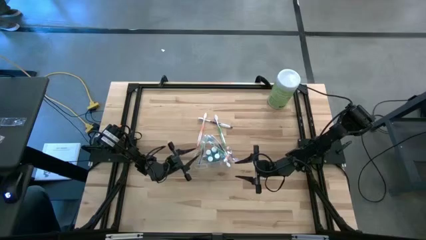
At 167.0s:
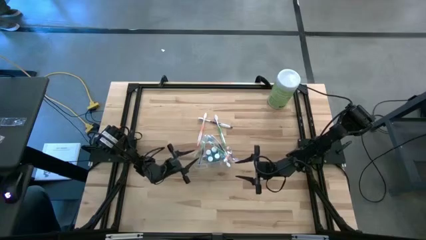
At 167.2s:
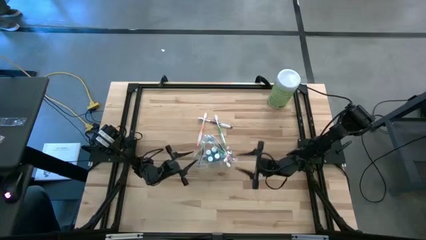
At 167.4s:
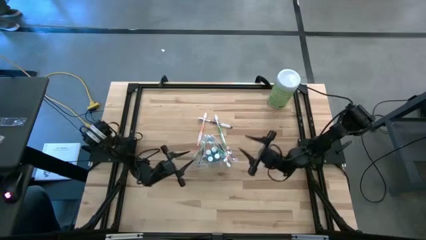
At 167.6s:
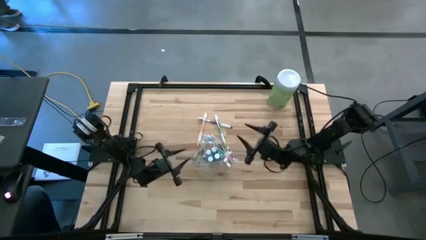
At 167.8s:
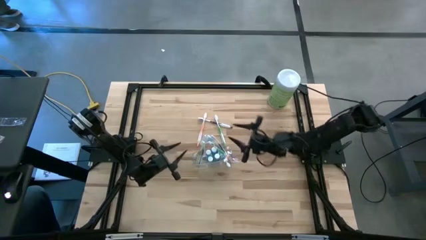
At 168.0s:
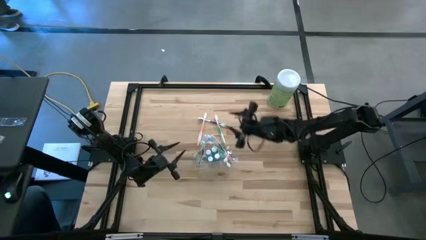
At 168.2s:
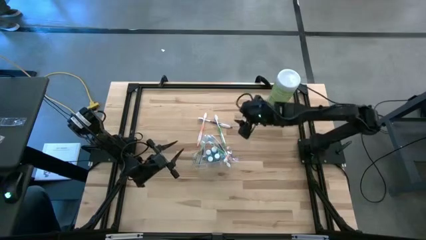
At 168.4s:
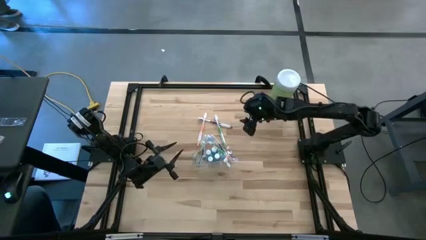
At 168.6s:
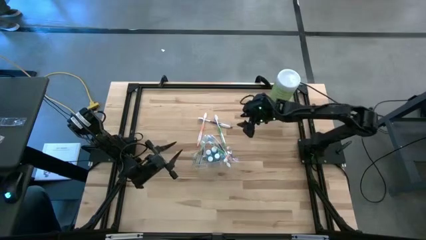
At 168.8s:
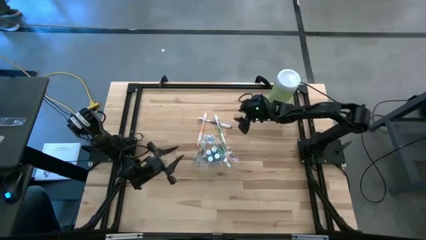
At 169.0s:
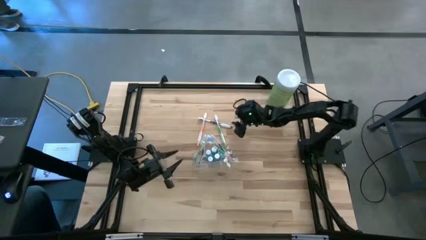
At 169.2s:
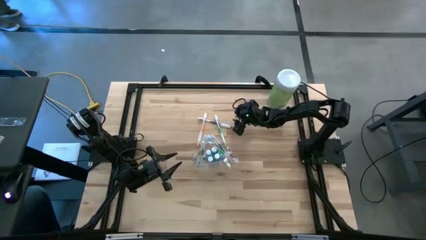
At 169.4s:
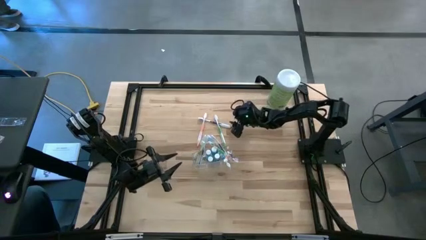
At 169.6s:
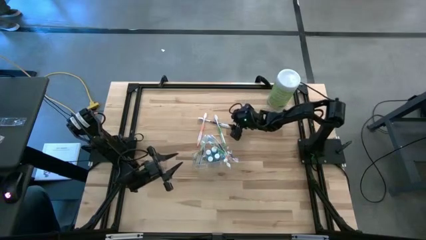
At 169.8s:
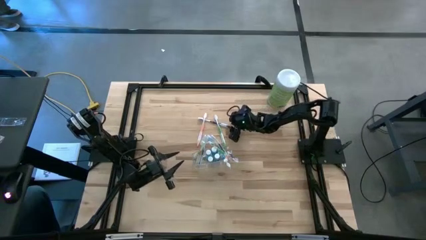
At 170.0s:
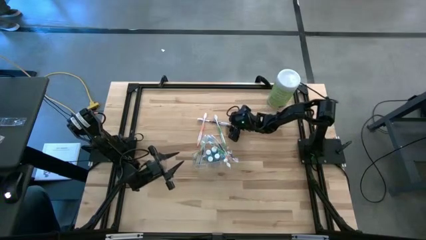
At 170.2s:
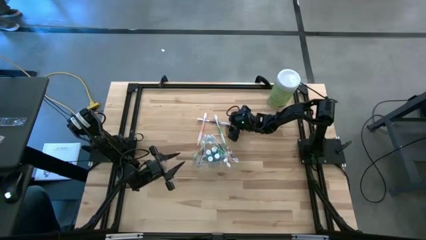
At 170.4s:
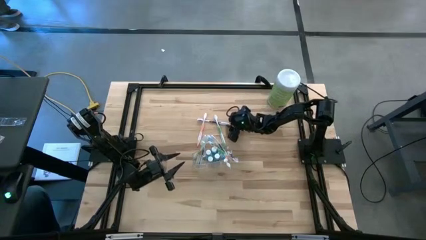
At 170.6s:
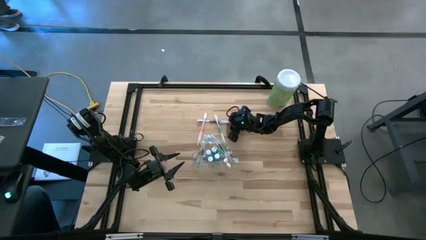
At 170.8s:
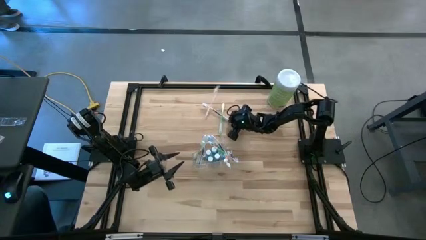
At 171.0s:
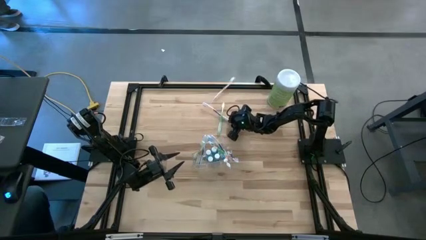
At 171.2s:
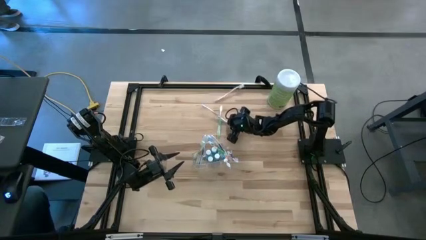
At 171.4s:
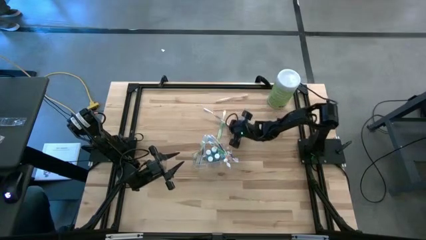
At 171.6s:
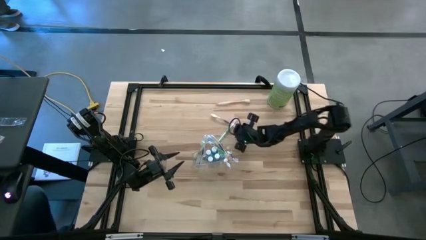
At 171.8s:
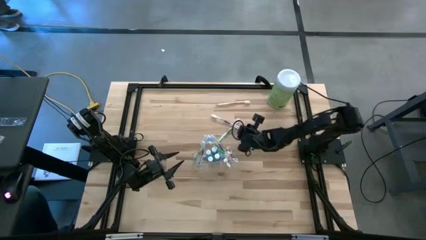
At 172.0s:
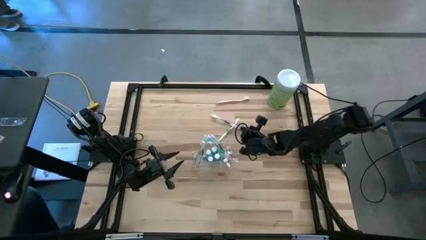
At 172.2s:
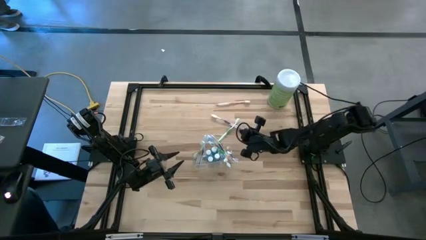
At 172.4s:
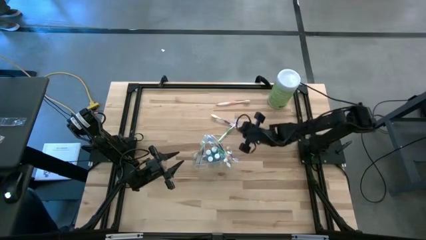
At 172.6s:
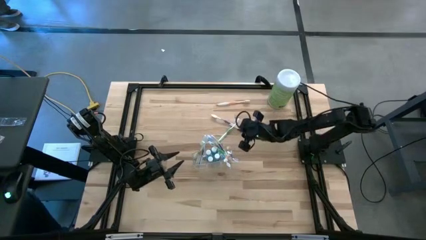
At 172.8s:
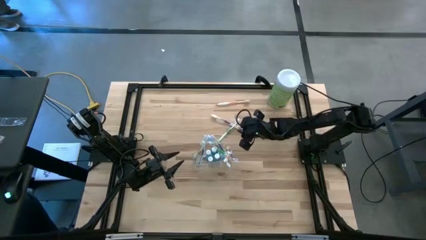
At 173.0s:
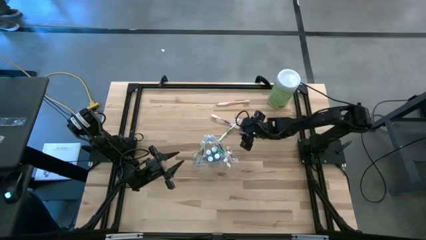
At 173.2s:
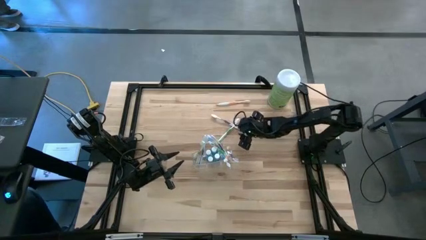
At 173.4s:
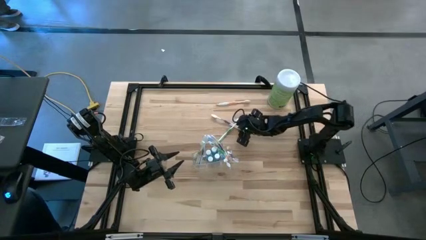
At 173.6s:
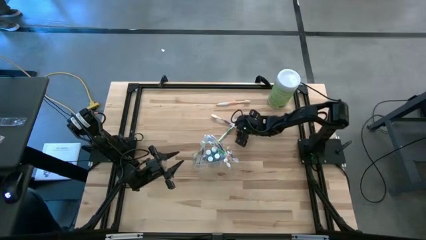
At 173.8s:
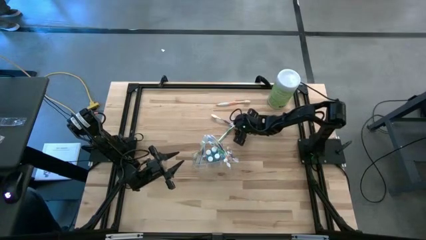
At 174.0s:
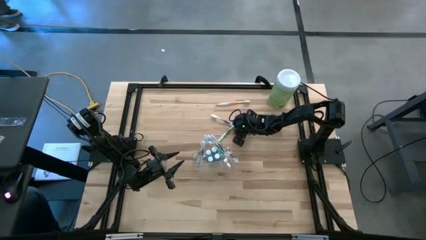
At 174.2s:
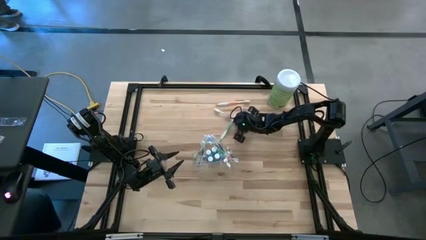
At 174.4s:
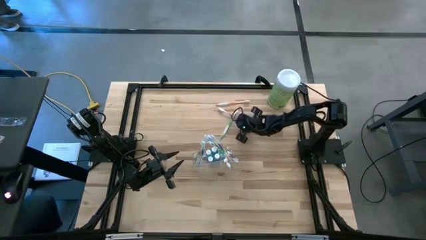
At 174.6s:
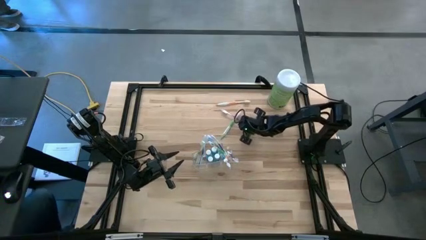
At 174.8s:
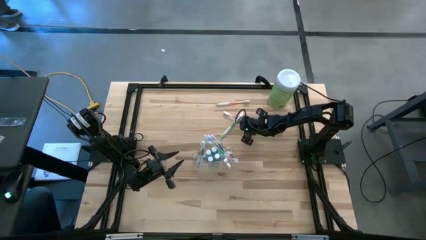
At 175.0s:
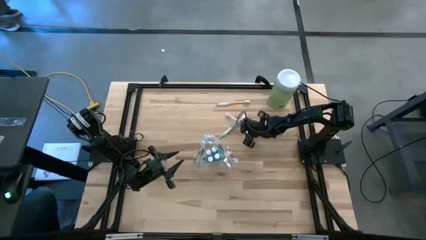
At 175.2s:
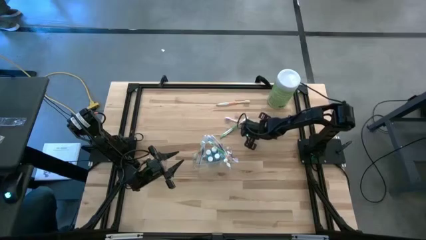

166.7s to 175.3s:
Task: Pick & Place toothbrushing station
Put the purple toothbrush into the right side of the transparent organizer

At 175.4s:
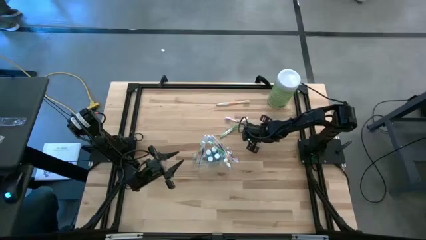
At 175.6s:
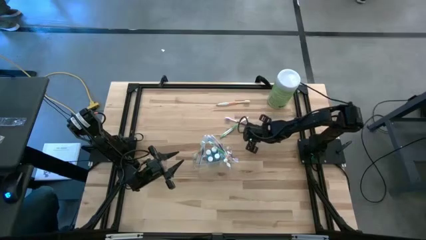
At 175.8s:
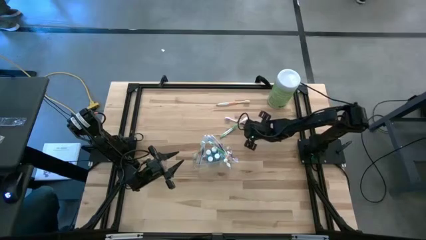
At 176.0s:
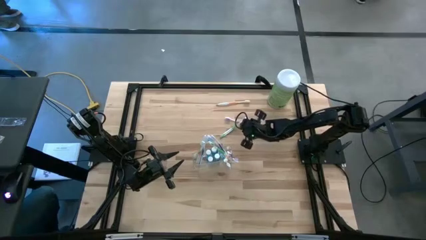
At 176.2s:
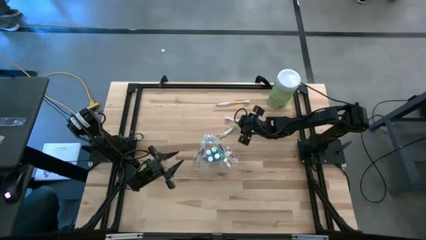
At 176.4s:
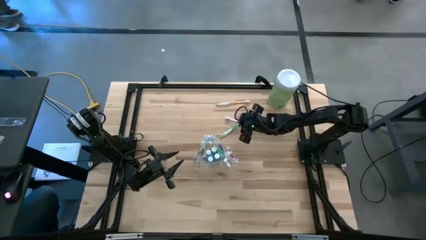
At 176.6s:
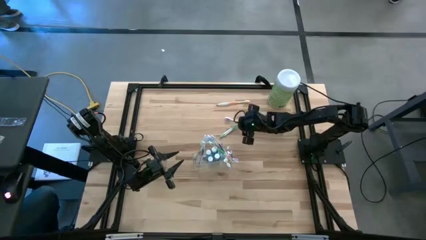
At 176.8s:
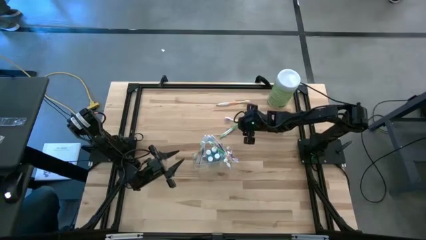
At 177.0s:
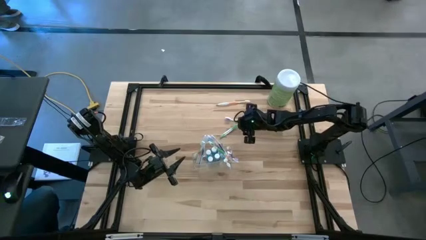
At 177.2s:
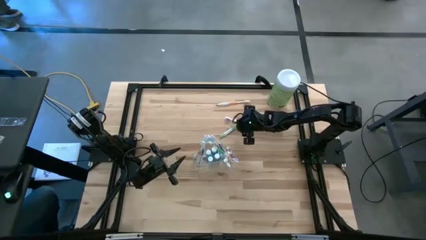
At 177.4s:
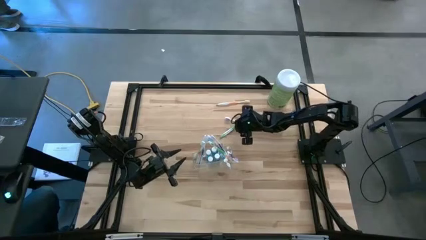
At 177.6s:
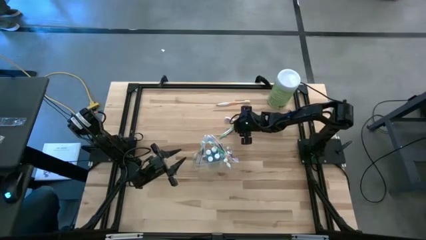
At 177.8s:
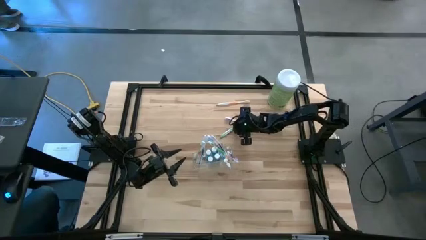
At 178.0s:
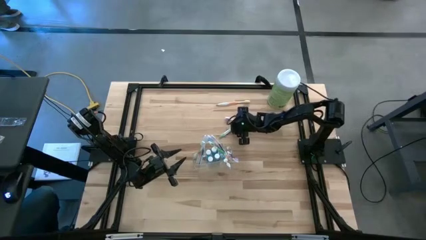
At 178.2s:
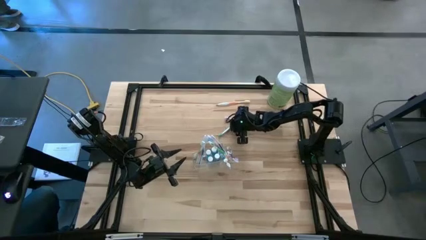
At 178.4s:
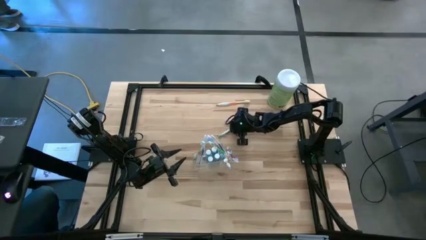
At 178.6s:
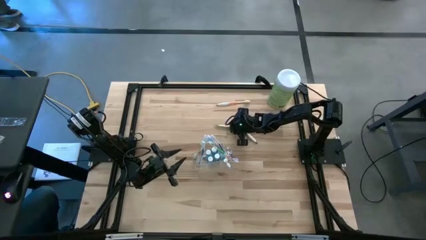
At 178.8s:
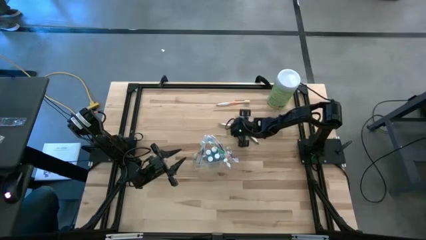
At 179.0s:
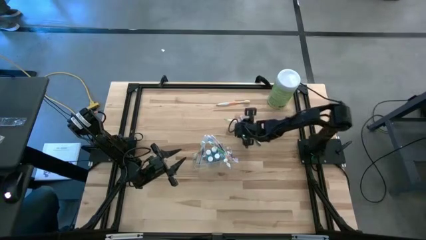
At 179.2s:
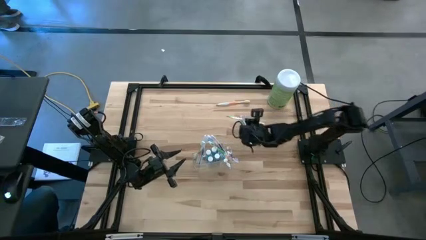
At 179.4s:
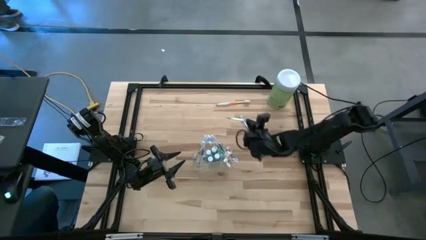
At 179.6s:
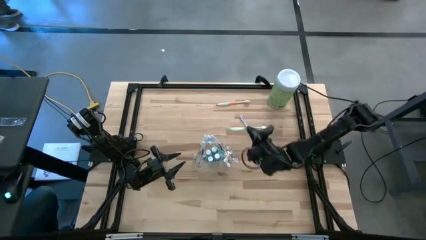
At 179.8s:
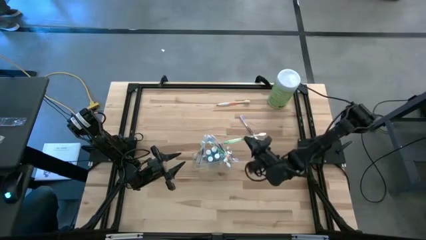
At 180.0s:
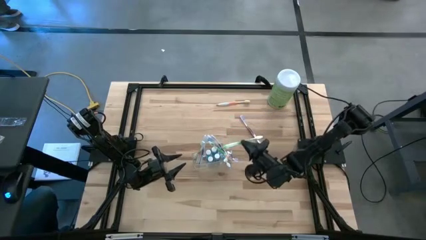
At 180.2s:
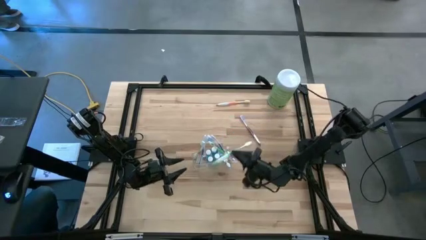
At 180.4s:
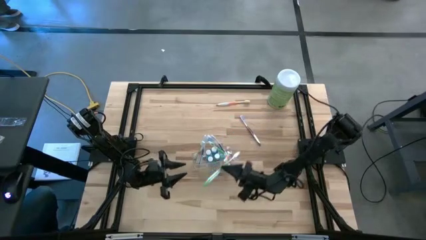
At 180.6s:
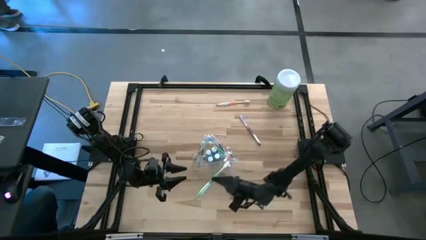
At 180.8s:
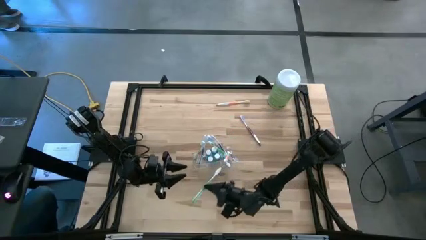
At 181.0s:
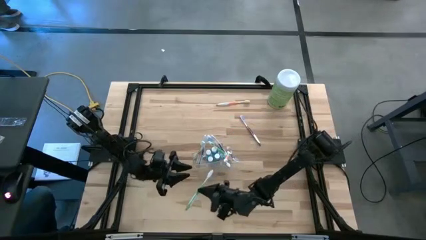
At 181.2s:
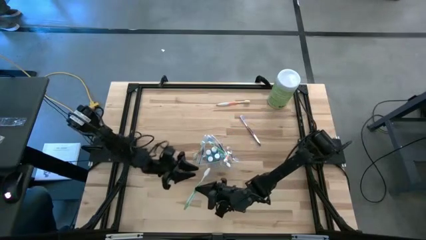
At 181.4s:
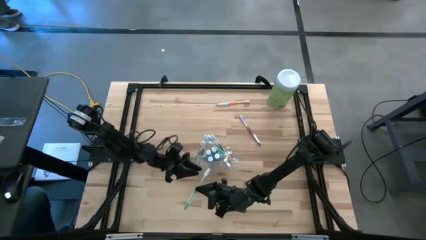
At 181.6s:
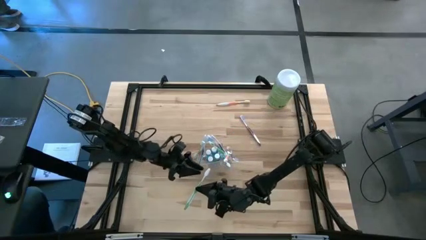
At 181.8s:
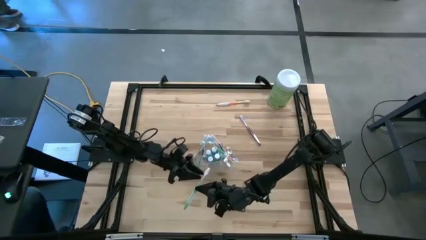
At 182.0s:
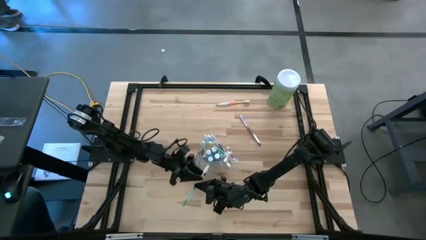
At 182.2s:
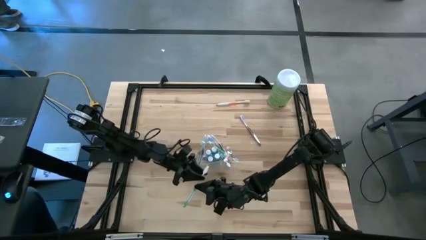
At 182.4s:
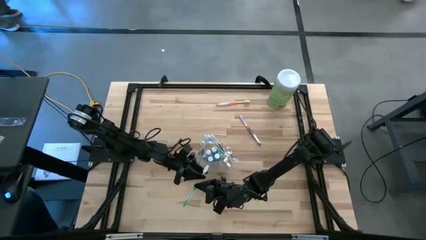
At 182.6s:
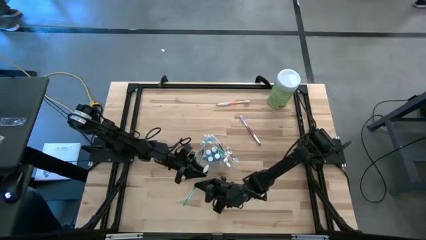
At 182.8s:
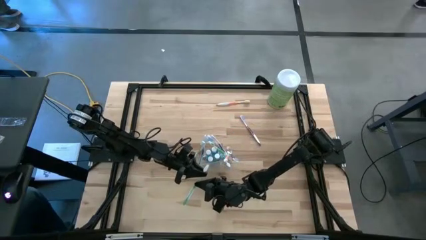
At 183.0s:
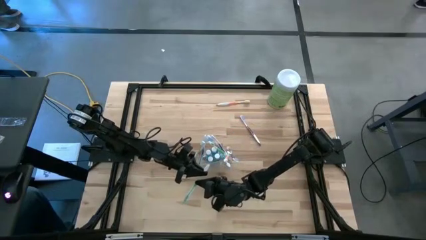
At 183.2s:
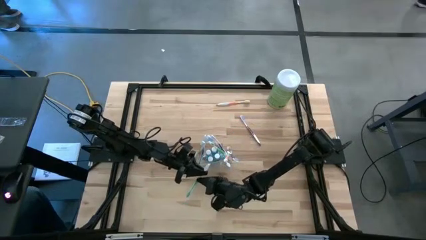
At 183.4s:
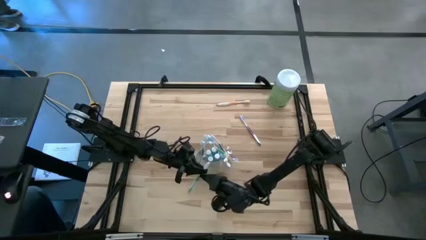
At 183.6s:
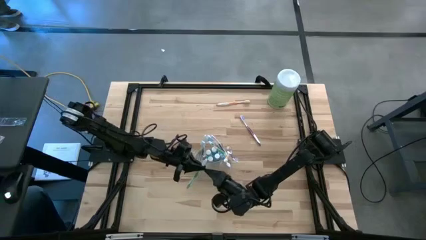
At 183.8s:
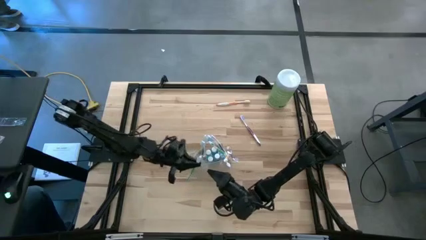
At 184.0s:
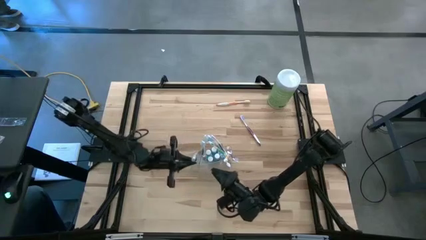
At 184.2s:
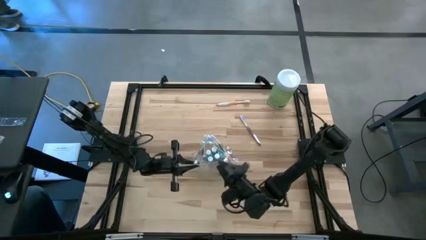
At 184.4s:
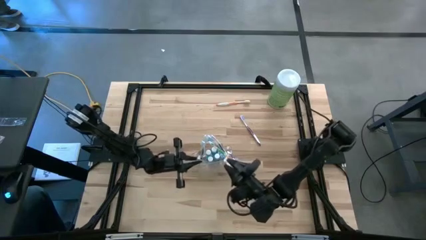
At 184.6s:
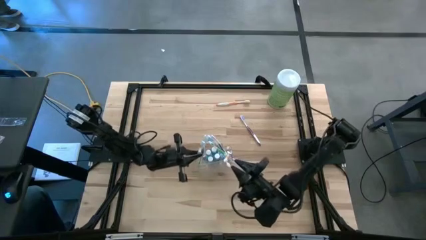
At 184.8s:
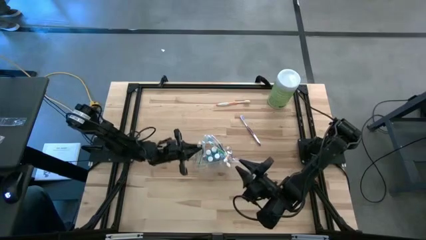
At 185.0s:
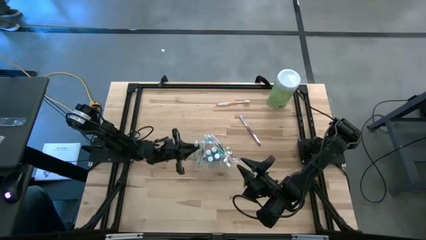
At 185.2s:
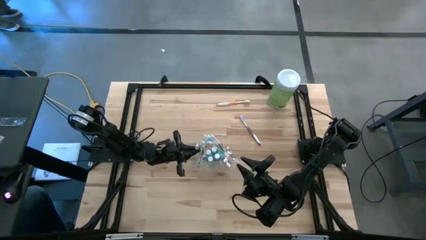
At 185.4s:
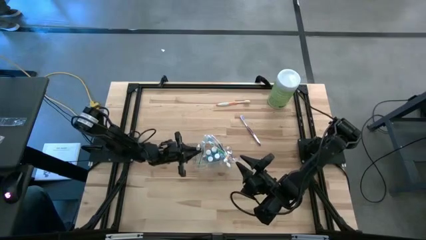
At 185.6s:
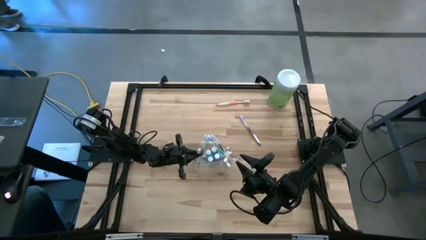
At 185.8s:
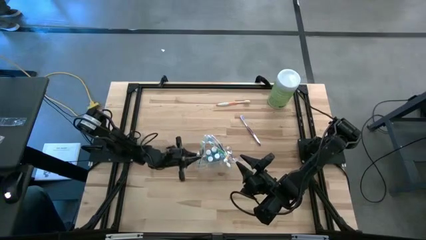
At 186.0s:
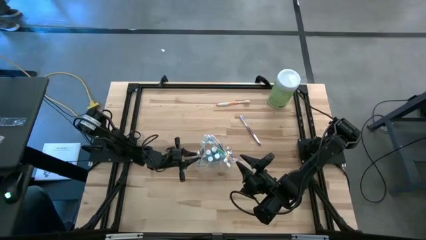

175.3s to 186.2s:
Put the green toothbrush into the left side of the transparent organizer
